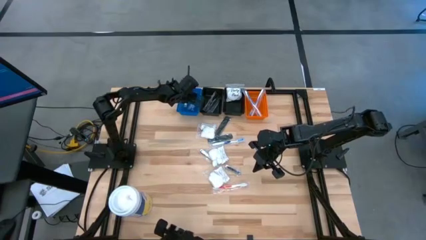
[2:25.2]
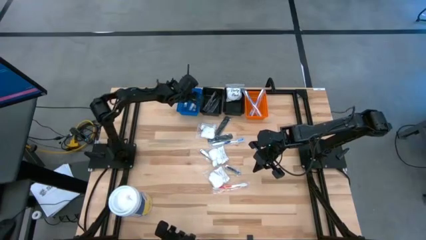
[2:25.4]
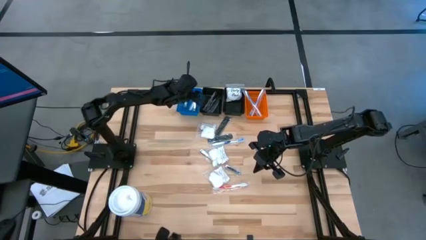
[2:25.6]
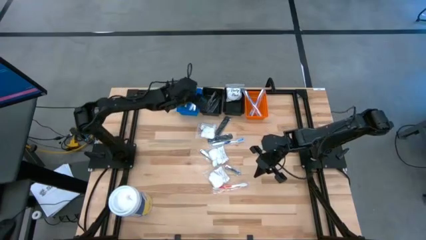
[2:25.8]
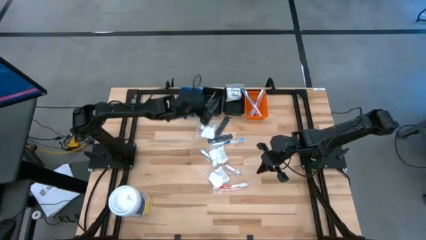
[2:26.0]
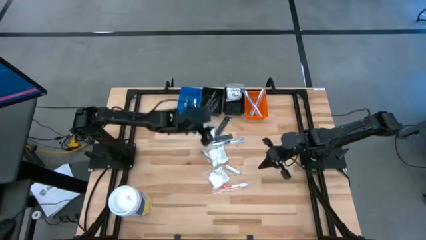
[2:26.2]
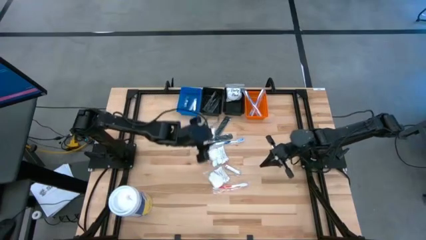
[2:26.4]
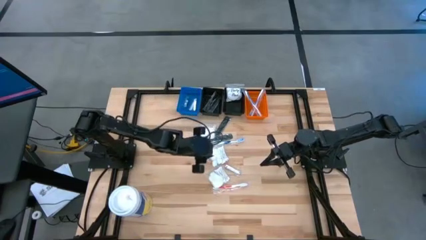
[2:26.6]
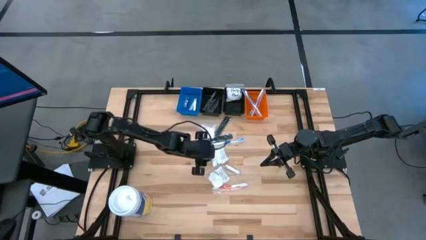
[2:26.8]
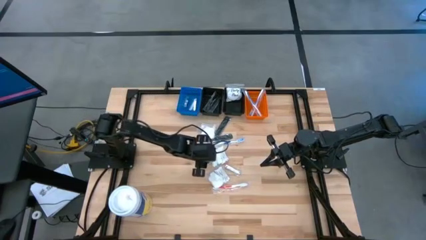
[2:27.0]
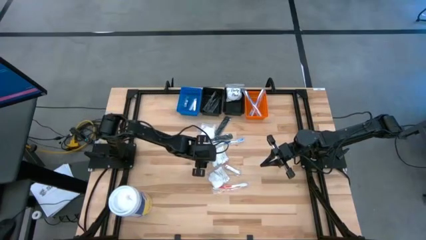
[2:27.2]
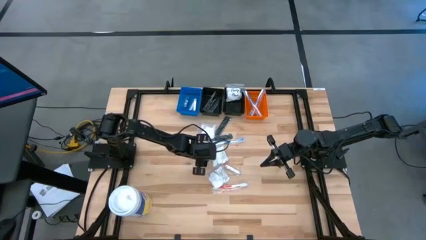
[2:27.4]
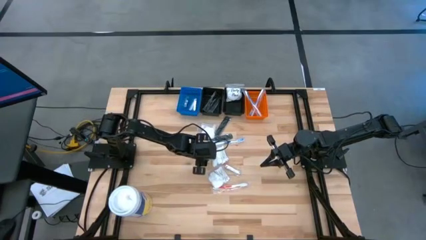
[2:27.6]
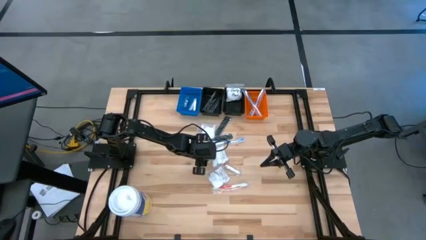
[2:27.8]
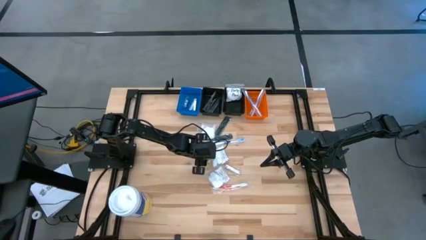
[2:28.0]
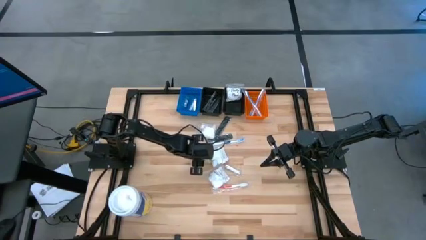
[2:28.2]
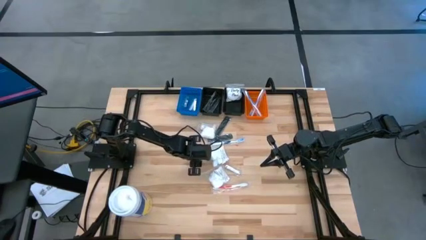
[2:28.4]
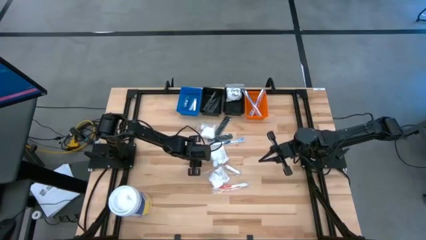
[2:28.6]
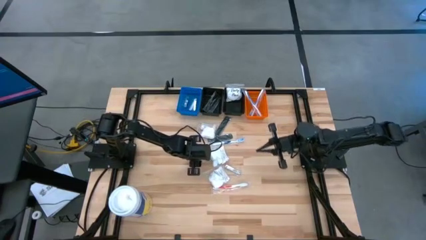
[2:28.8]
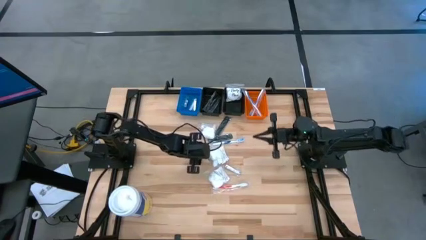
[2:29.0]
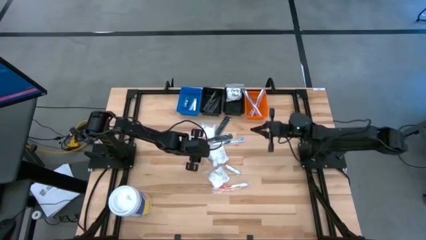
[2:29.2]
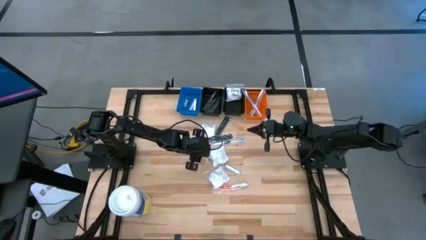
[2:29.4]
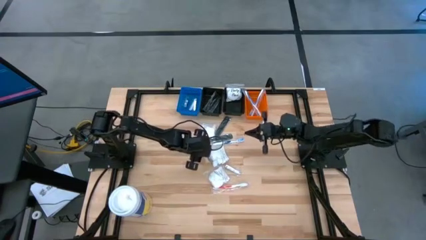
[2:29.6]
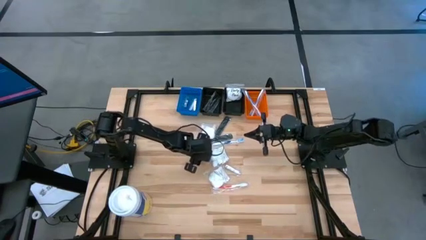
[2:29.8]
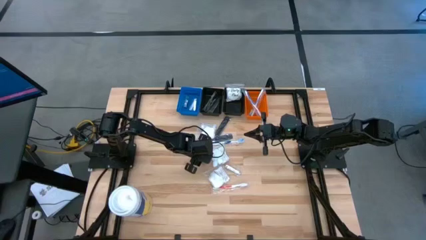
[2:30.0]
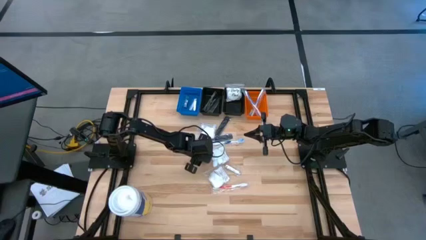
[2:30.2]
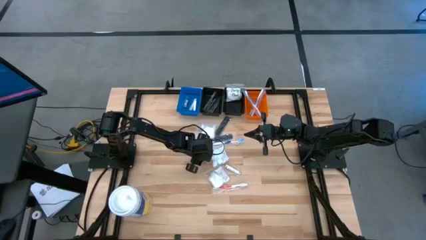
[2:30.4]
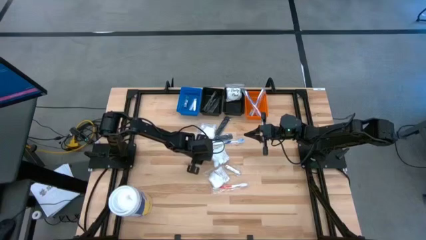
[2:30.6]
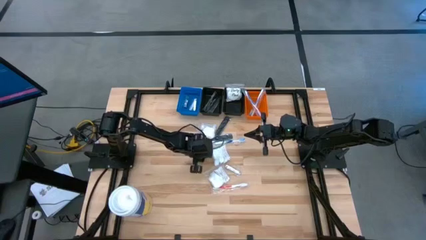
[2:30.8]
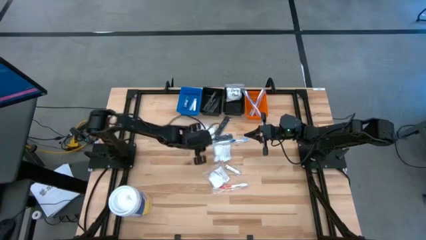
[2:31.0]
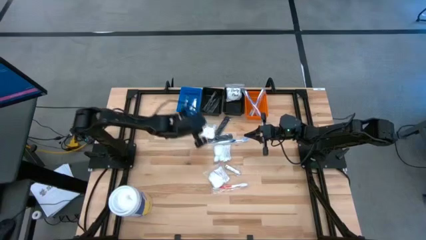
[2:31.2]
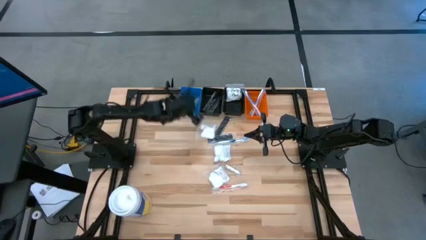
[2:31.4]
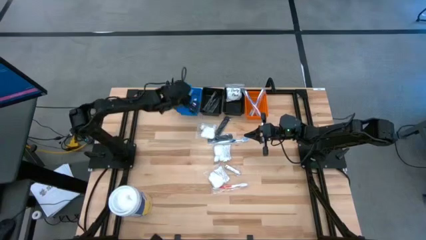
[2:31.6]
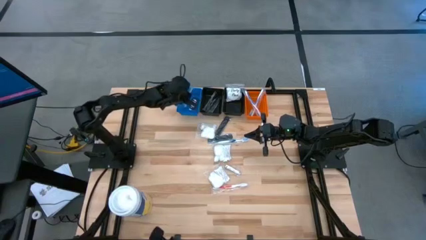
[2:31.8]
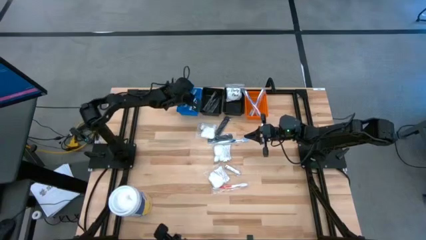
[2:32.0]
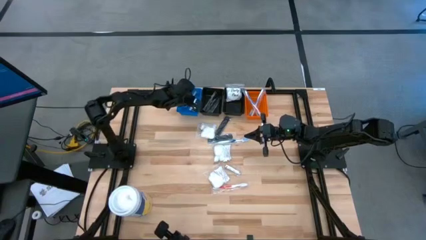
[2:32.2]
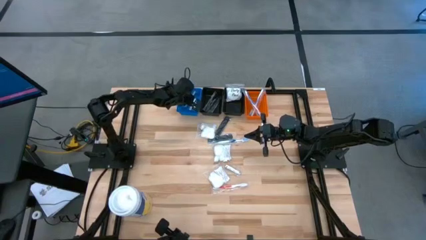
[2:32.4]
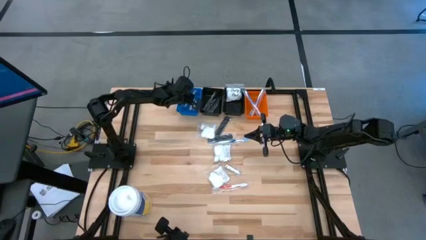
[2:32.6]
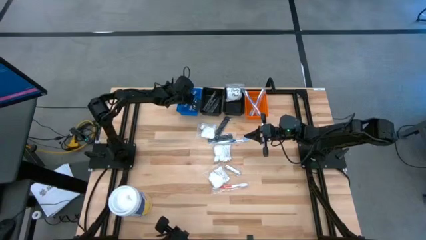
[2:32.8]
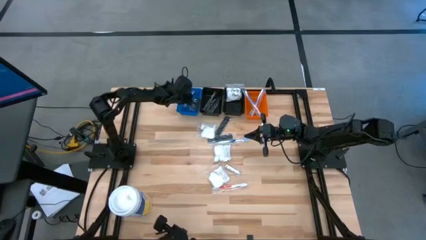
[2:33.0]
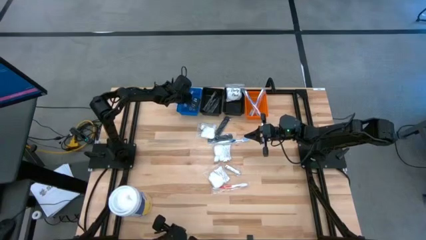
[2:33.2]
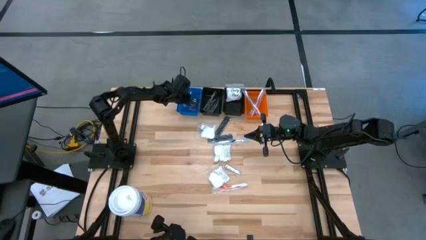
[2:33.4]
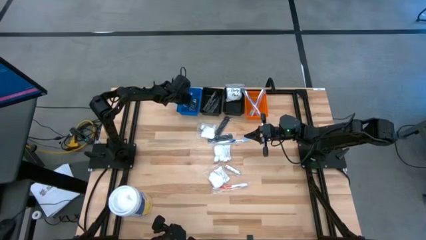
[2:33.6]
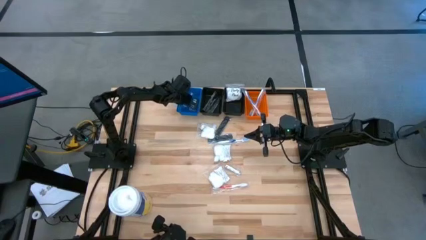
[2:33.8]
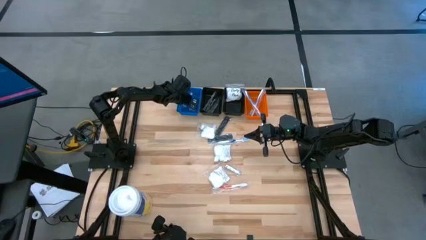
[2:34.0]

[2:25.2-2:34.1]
Task: Pick & Place Travel size toiletries
Put the silver nail cutter into the blue bin

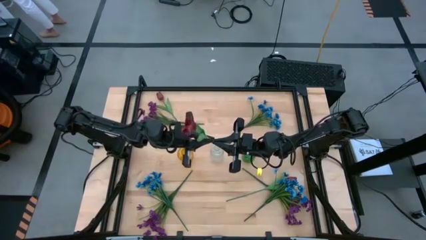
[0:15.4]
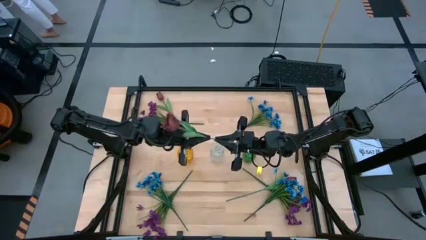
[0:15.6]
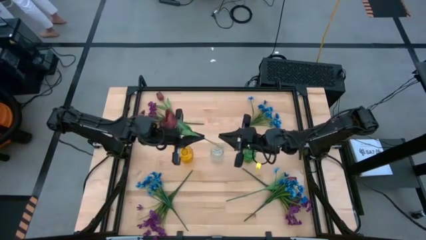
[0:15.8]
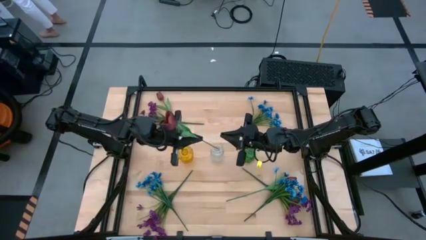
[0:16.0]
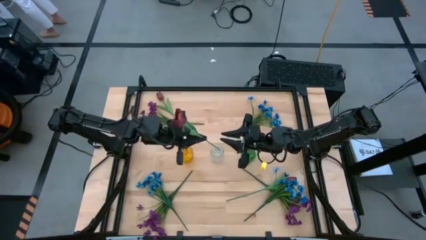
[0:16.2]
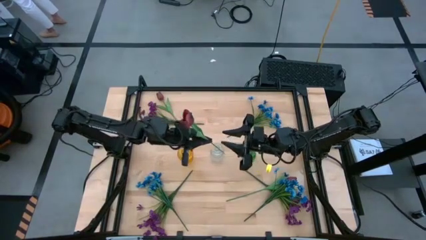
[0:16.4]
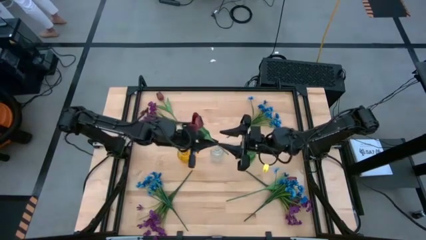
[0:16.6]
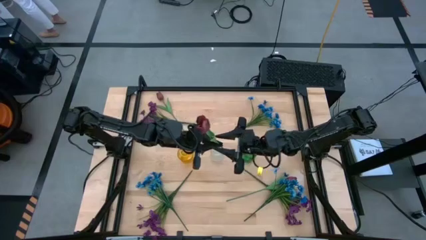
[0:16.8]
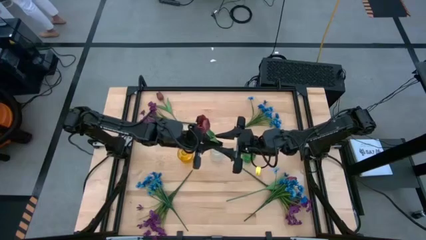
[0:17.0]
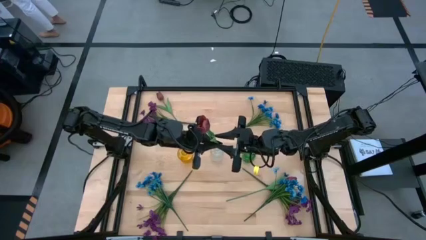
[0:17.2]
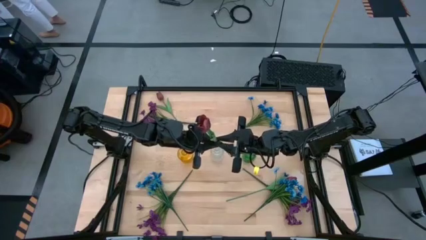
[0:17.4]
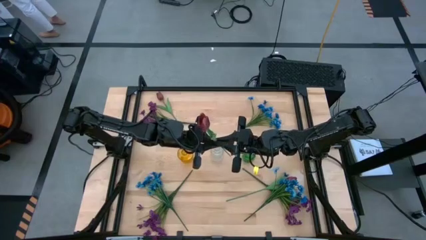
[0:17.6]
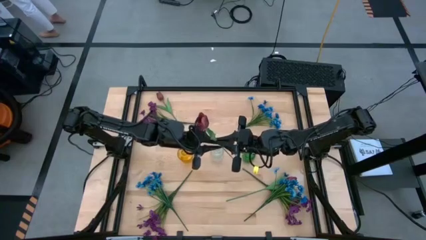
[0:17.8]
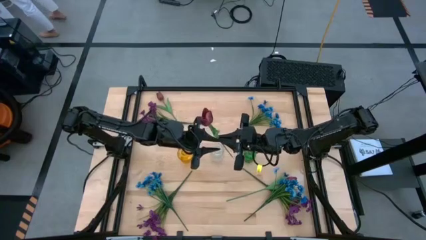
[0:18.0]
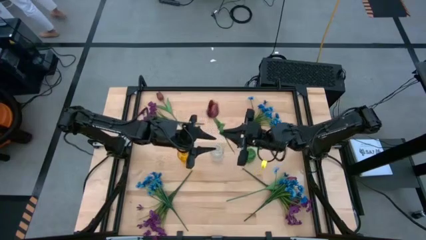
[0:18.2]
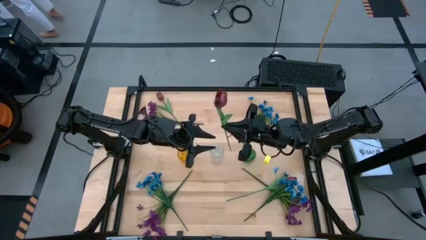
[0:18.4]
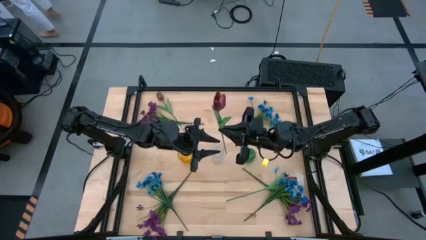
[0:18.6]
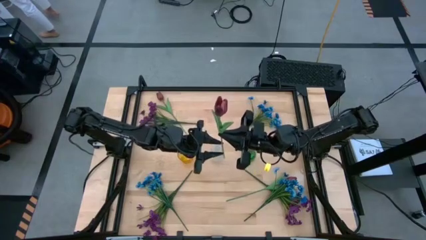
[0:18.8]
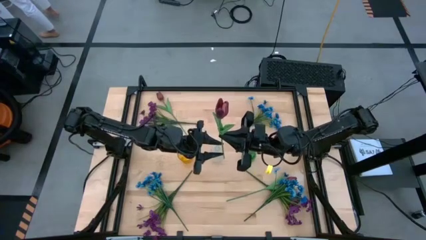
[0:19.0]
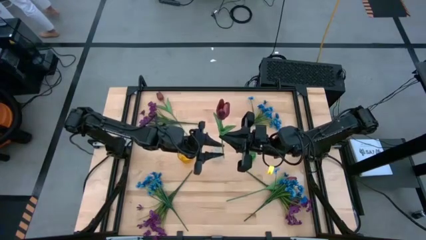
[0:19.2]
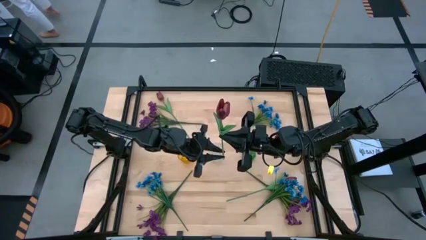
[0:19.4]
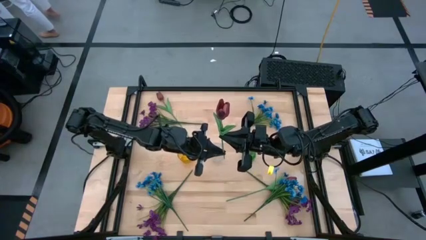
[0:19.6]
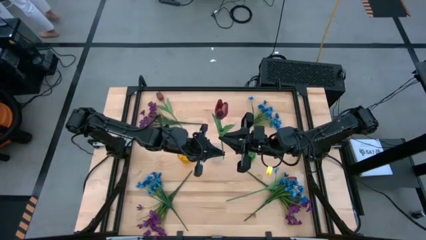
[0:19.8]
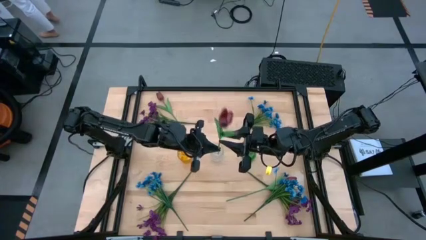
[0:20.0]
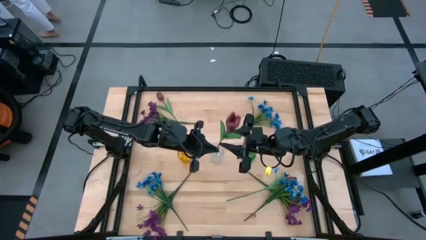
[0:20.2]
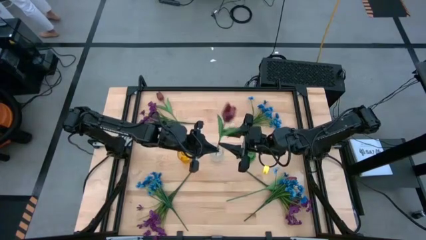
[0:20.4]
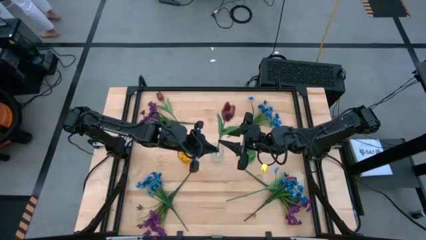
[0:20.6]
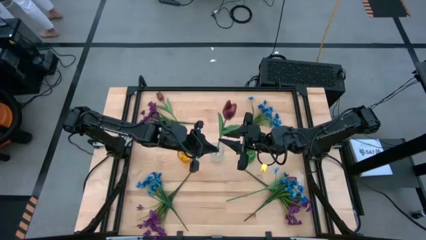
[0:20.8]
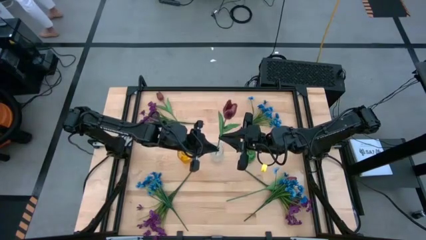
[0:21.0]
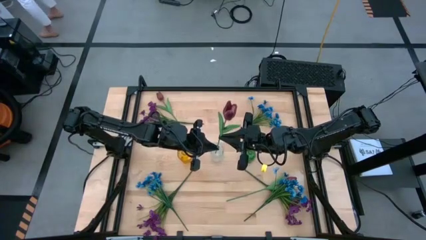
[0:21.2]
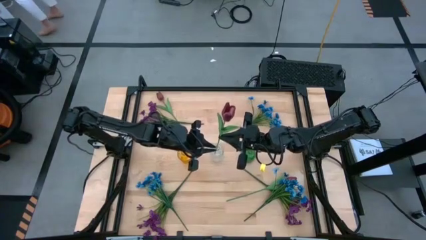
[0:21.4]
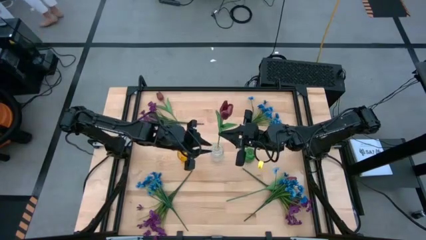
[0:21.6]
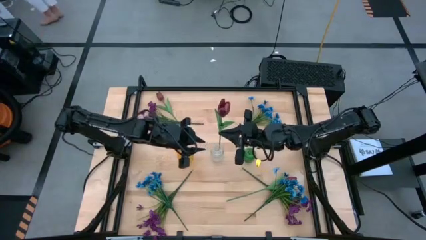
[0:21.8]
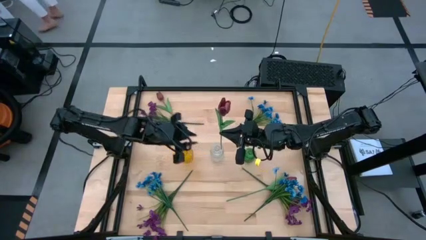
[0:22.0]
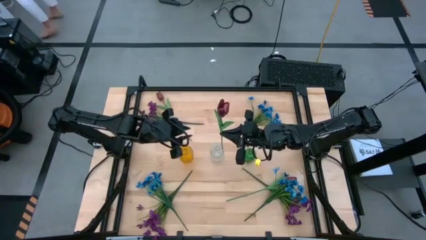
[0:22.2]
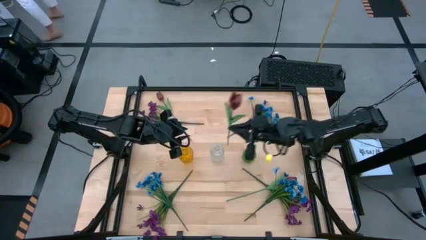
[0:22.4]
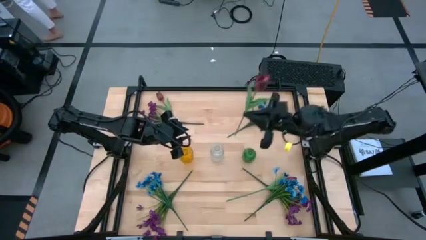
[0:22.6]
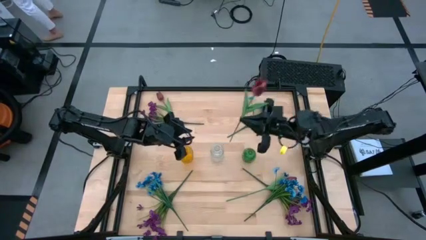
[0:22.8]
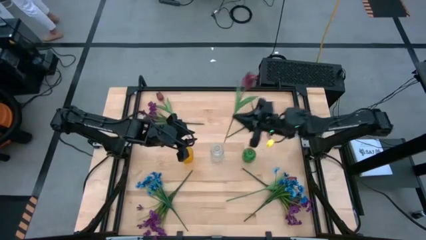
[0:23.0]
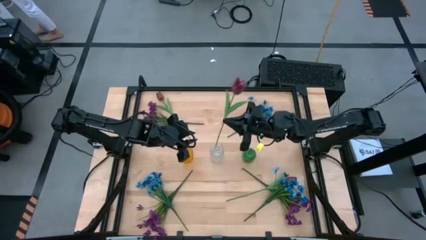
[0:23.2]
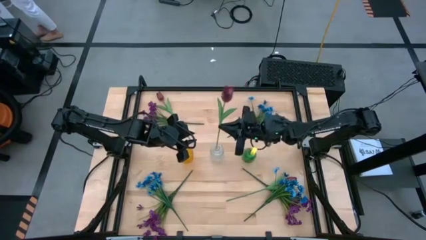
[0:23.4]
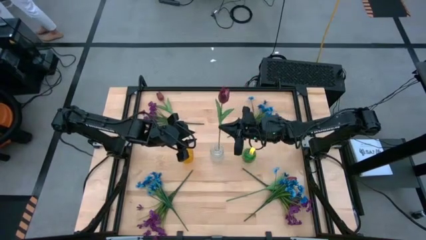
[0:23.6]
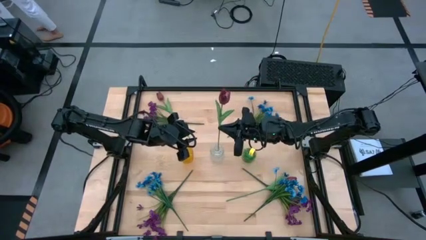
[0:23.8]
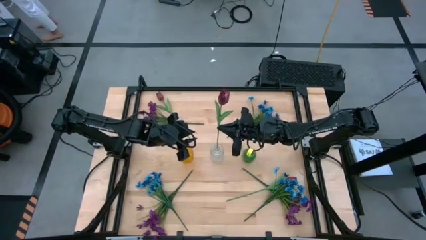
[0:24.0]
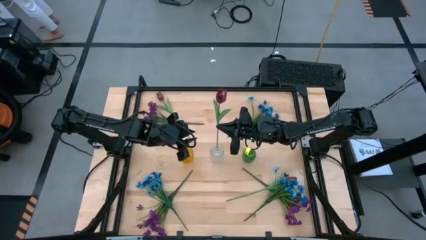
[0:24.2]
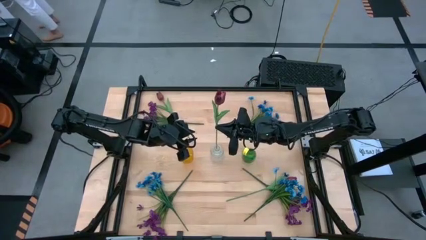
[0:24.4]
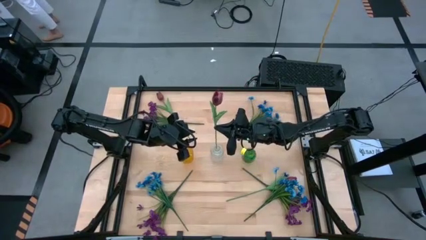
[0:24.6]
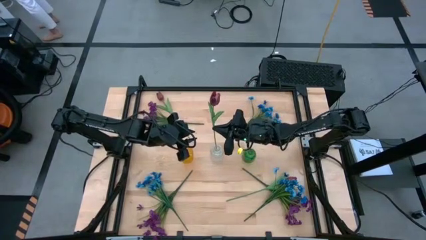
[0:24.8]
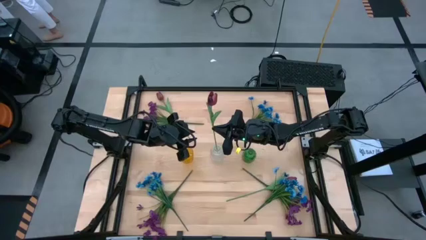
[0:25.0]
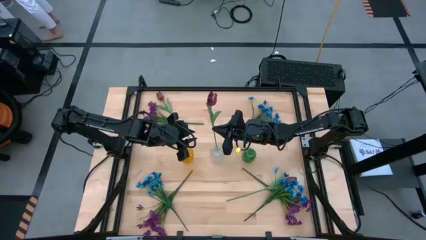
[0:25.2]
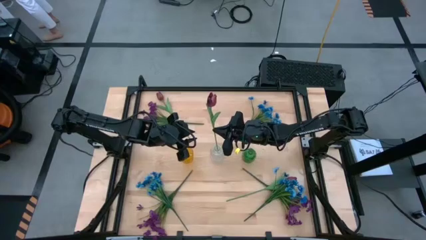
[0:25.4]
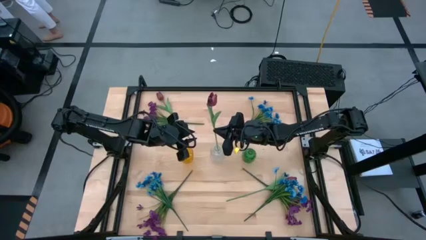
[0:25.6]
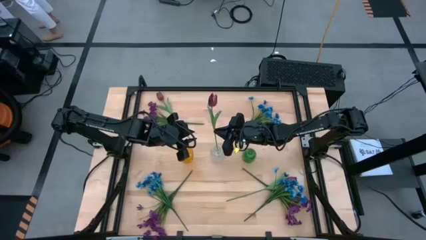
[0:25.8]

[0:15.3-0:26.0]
Task: Sort flowers into vase by color
Put the top right red tulip into the transparent vase
